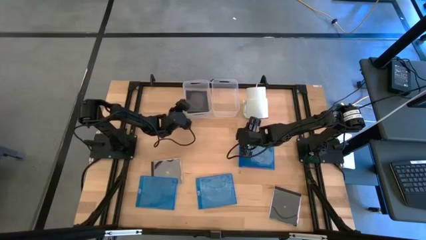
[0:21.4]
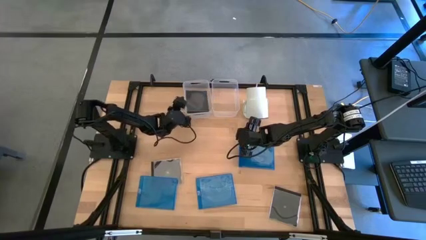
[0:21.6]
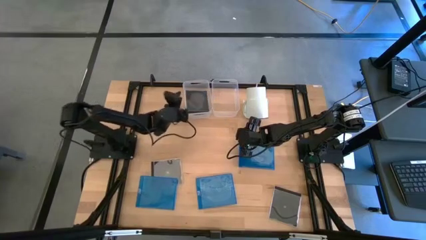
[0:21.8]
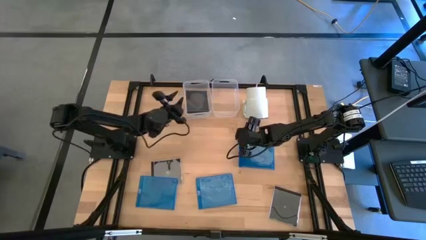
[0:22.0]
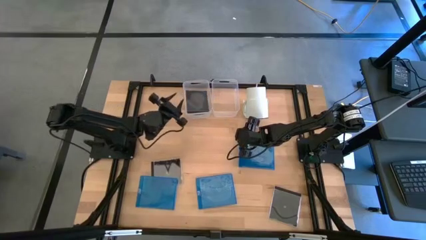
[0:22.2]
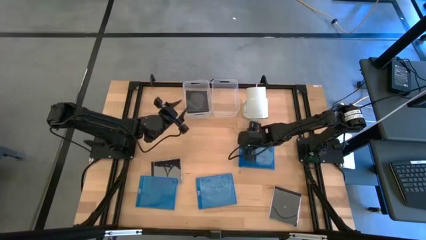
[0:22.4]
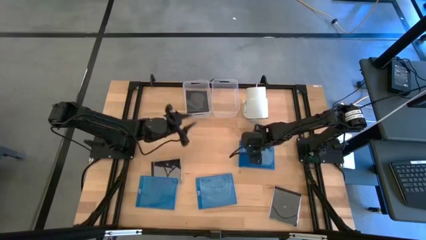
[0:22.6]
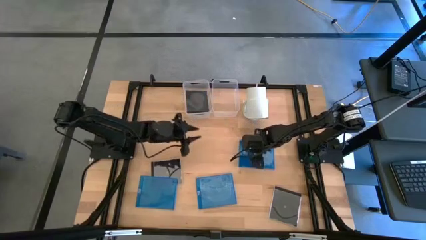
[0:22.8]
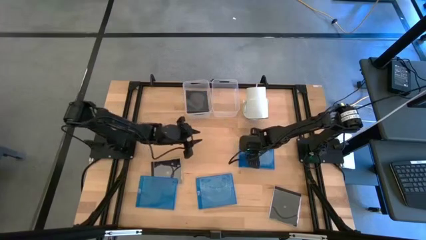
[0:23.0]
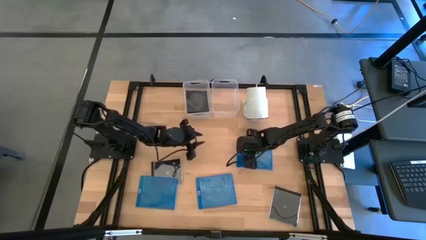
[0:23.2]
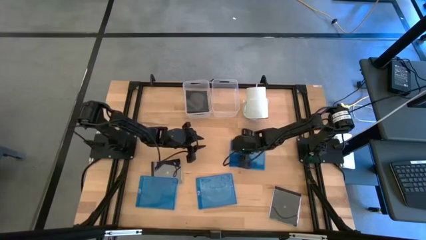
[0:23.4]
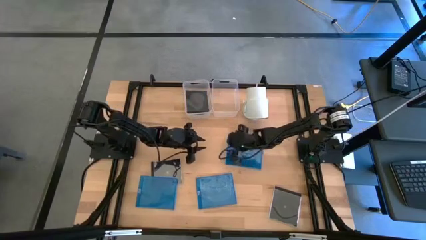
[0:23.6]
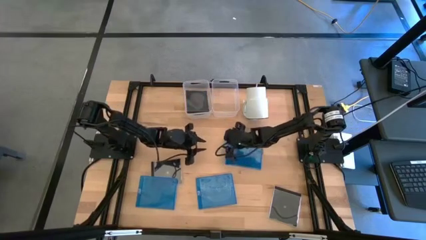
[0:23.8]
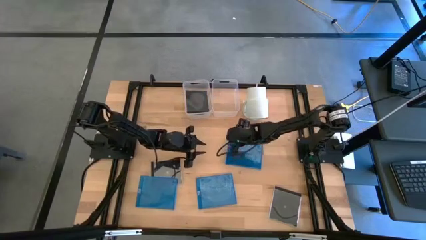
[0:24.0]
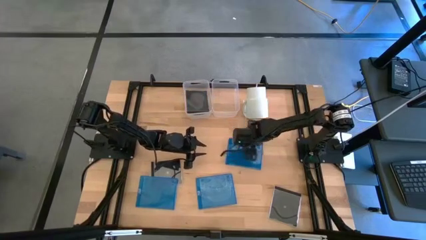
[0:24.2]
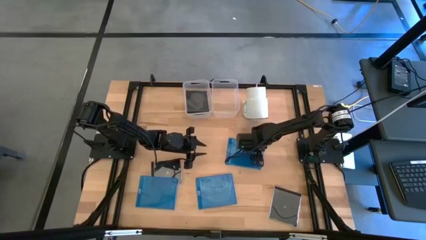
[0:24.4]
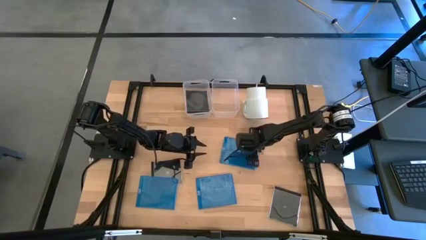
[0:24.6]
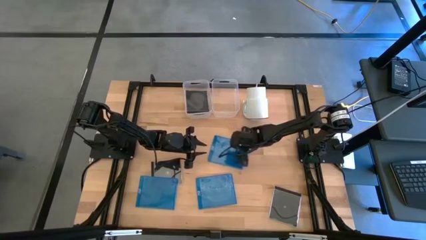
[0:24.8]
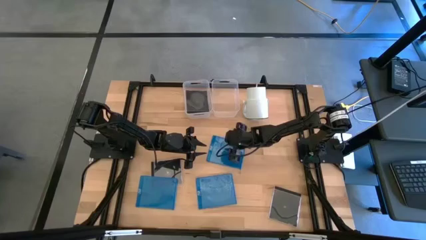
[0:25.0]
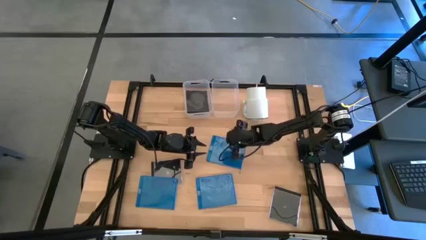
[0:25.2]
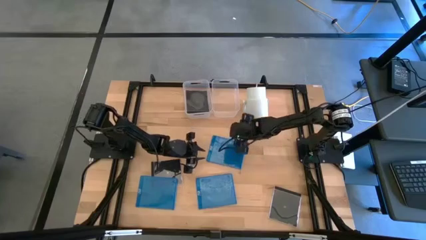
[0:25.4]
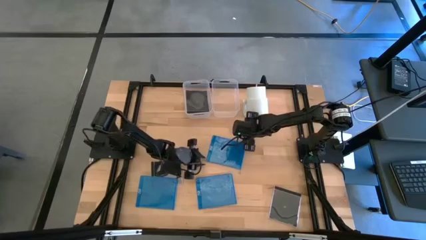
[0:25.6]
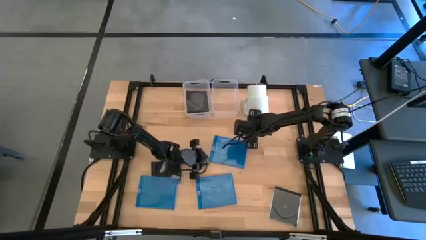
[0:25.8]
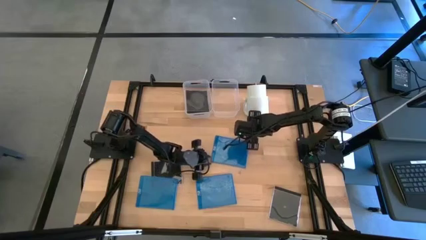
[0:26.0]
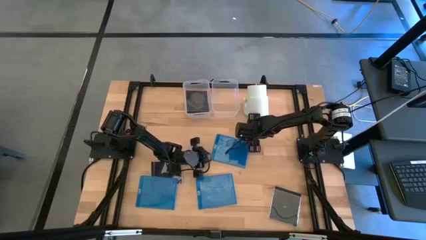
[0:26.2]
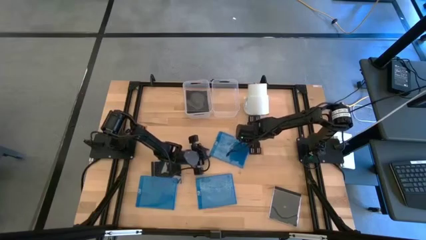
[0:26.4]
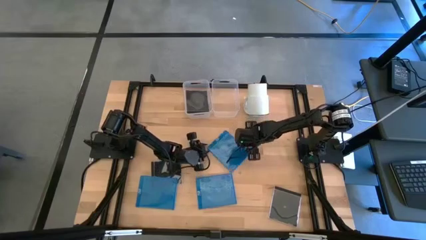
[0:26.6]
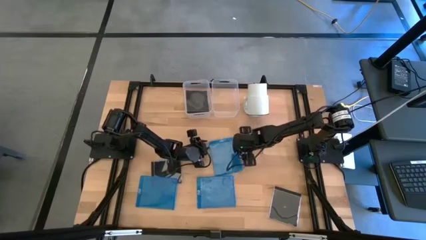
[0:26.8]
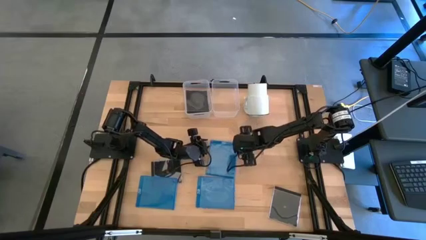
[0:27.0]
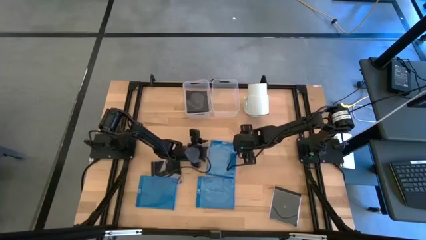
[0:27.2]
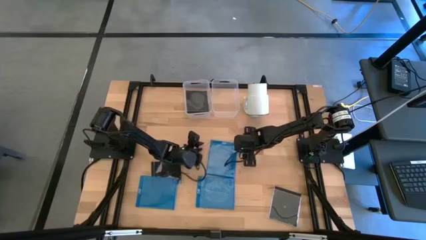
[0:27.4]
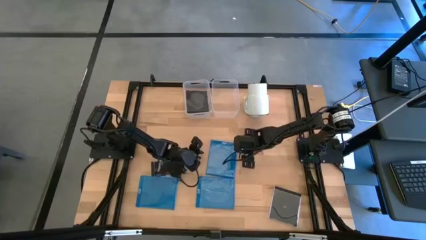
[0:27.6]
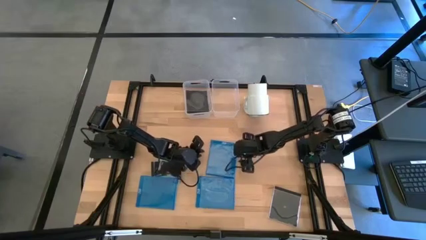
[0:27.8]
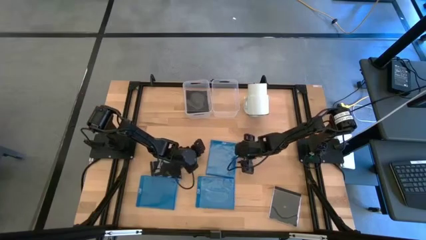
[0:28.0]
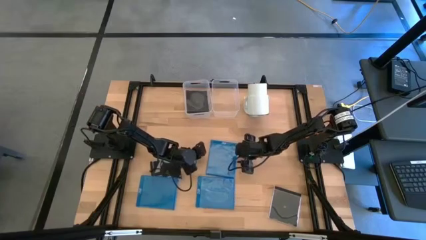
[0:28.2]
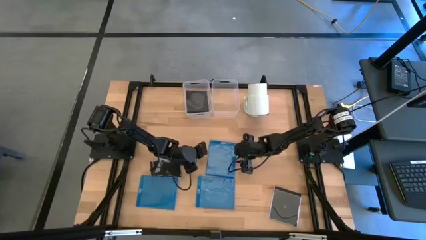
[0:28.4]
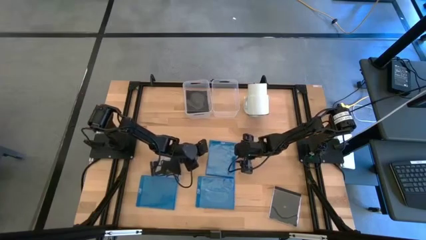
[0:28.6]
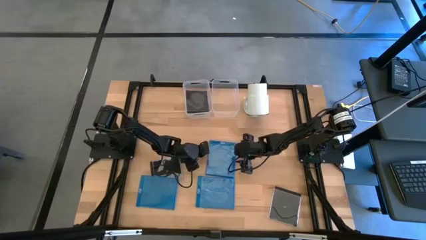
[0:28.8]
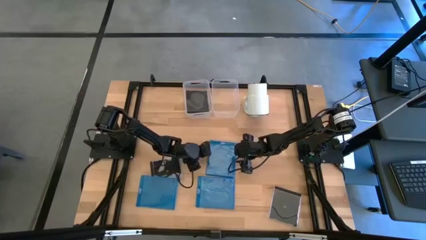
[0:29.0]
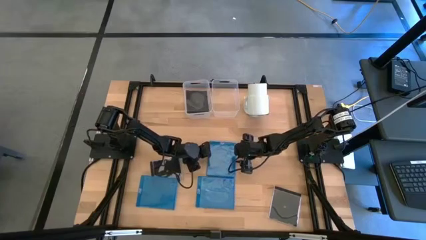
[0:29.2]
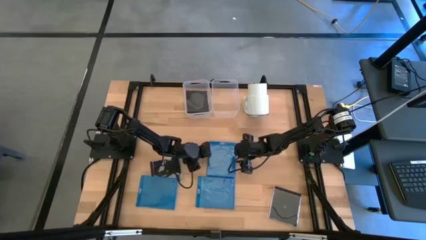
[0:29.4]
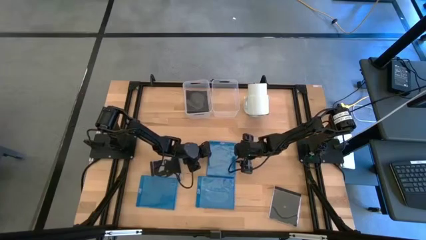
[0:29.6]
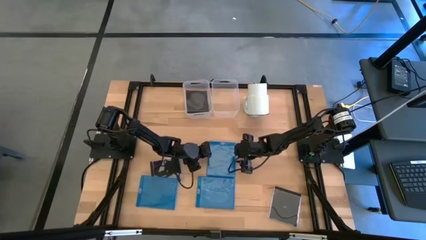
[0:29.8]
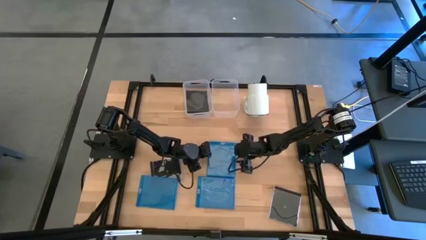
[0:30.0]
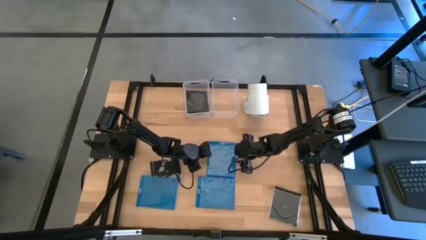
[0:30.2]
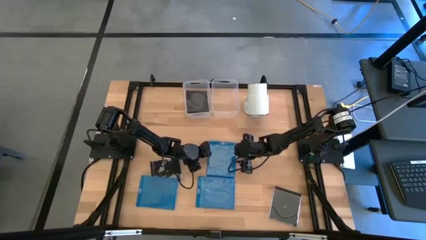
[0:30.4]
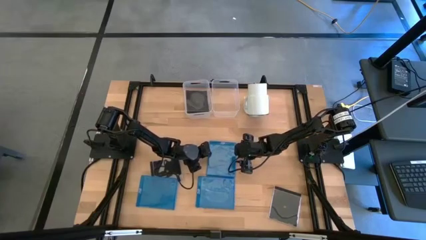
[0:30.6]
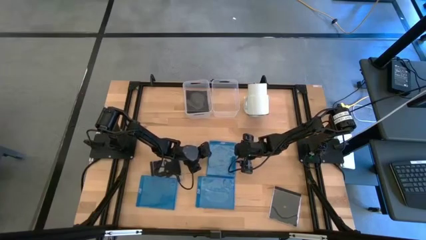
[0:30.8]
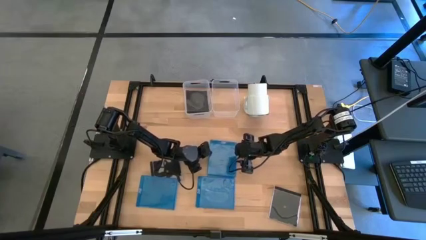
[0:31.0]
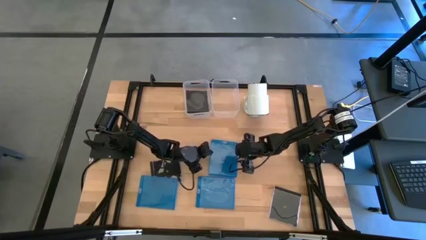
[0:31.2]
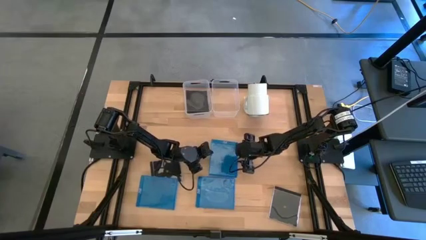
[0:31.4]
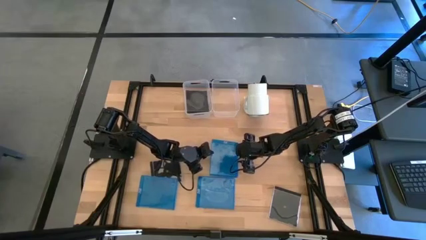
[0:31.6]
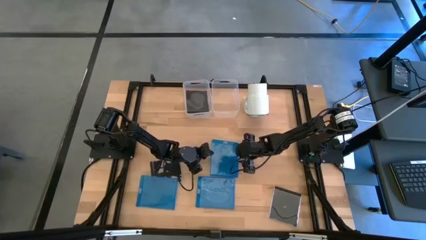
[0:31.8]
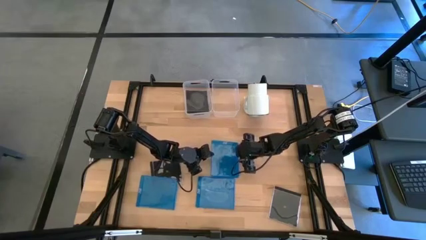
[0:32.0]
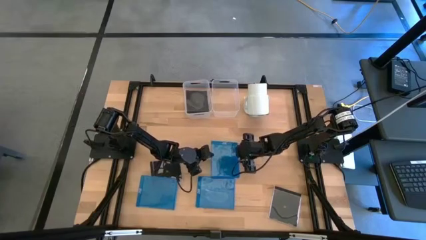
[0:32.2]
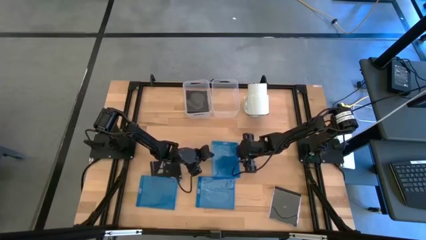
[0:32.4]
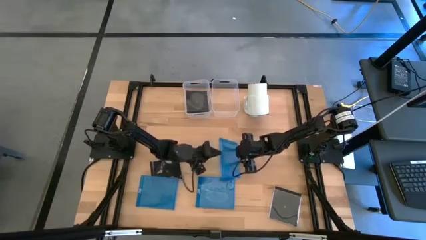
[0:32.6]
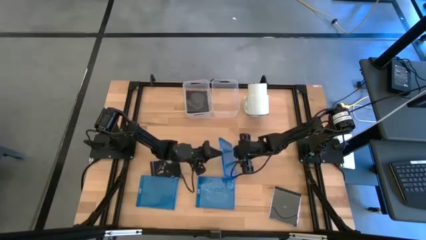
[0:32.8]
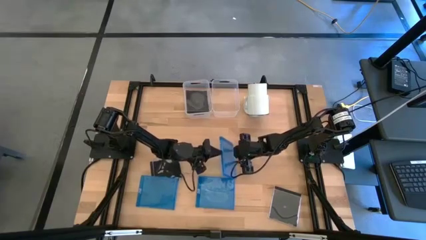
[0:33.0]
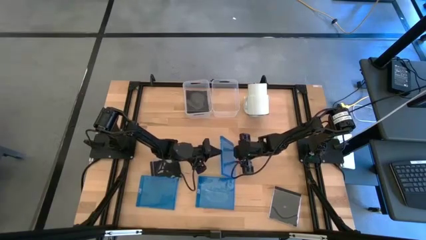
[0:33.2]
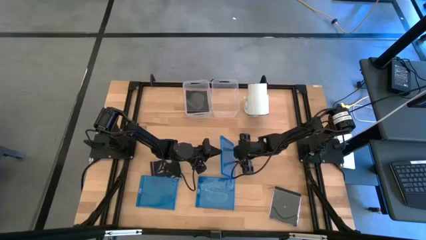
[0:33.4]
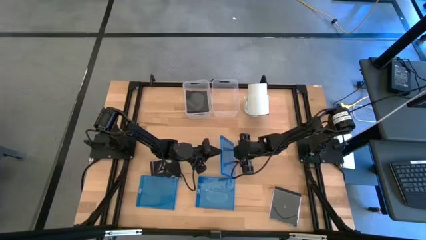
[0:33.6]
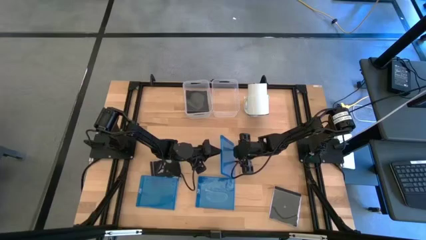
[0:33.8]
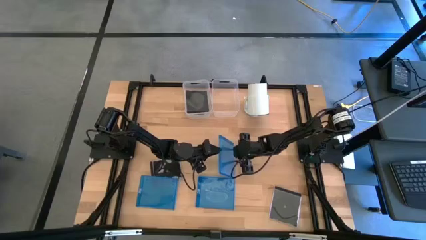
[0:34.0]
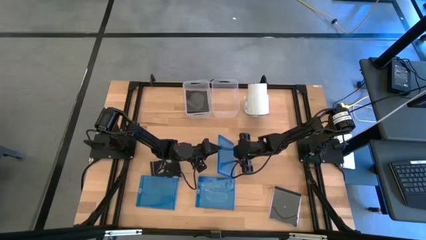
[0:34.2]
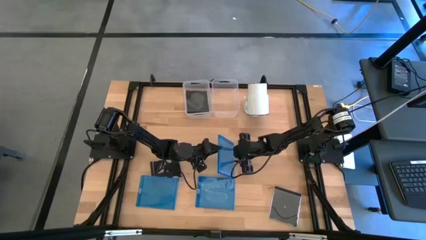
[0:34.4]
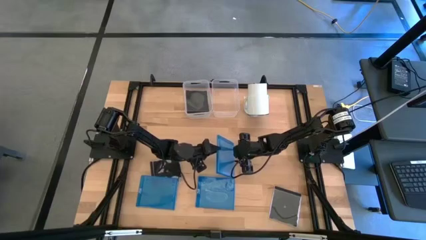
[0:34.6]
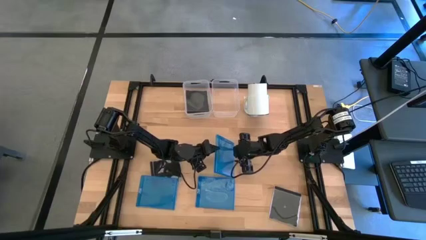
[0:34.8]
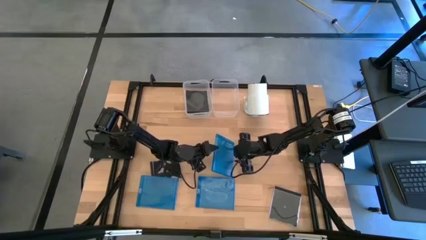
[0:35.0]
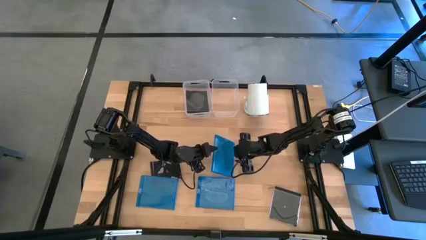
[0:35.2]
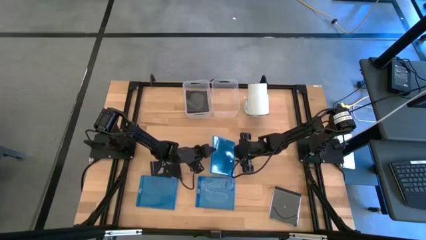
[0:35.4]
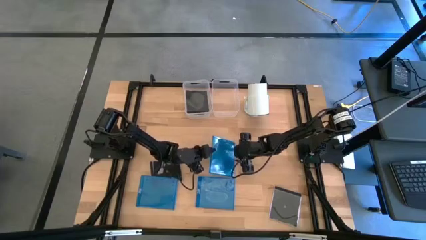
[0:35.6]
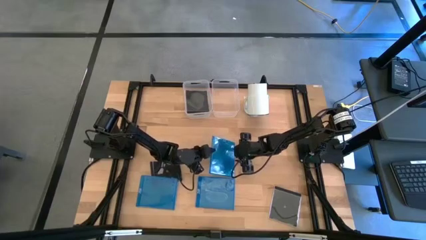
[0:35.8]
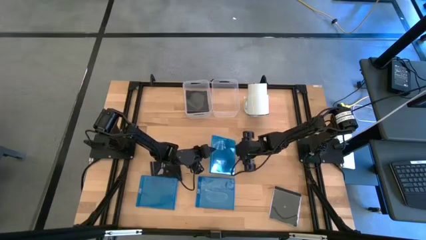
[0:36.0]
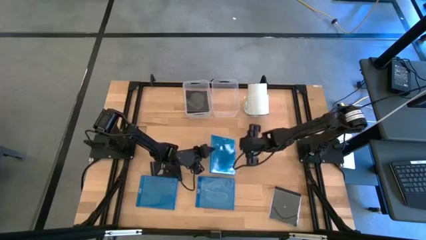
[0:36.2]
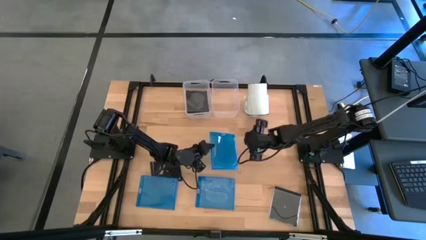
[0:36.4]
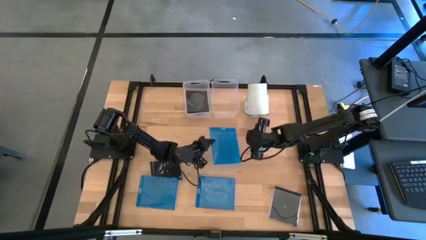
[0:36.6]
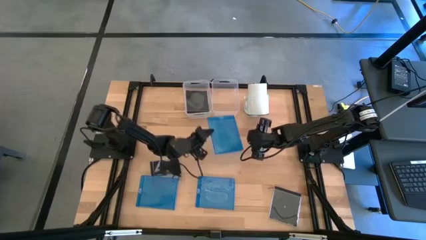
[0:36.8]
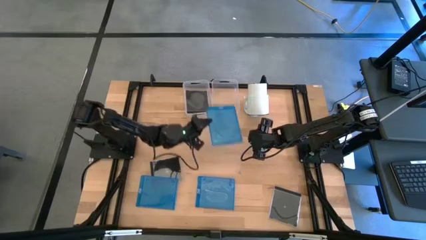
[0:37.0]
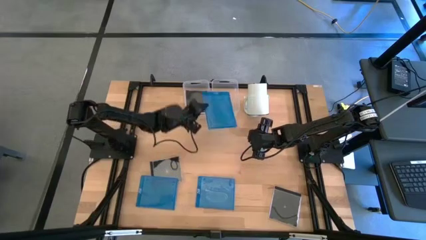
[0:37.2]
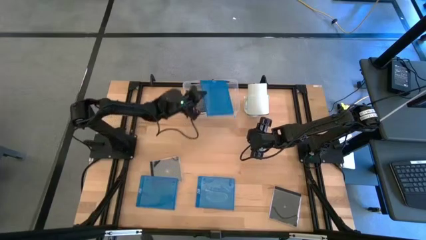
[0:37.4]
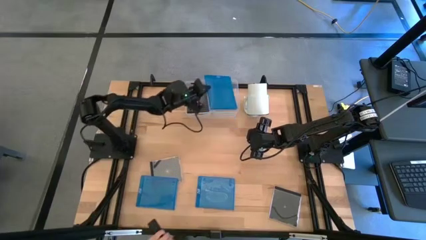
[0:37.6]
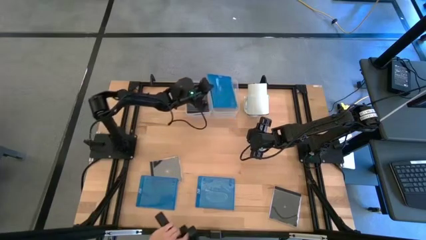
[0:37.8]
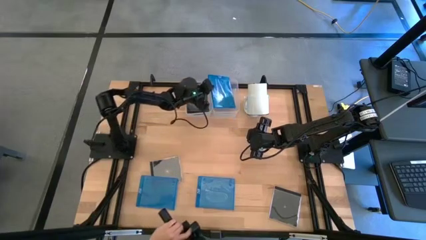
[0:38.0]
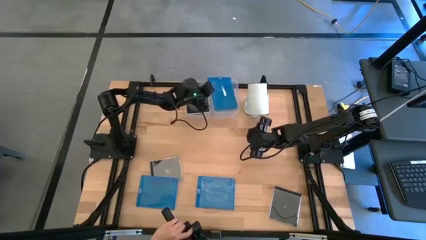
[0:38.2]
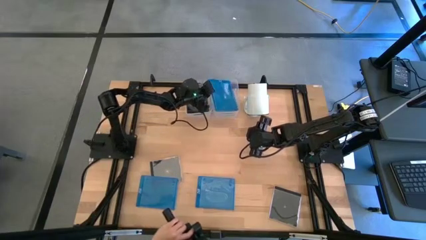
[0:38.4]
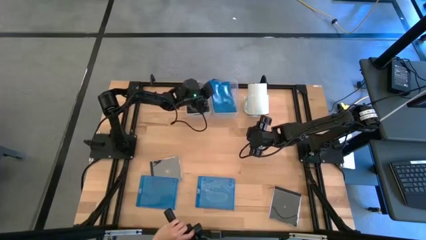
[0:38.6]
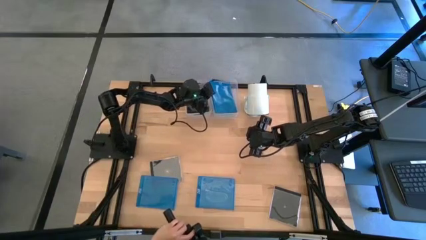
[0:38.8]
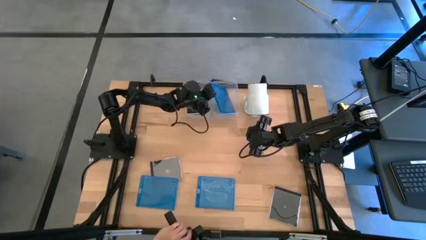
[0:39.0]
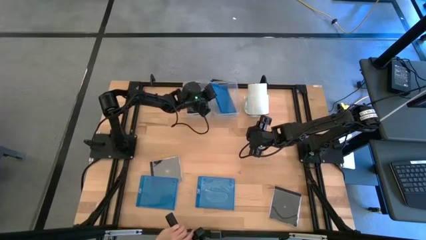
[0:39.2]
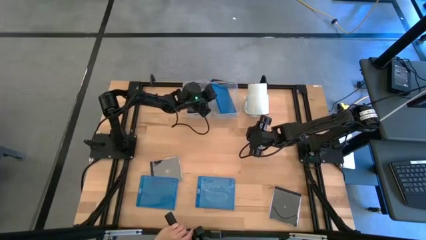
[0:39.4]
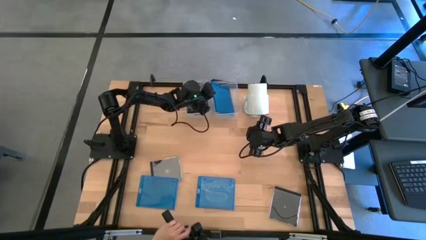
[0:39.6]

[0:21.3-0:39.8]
Task: Pick & place jewel cases by type
Put the top blue CD Case into the right transparent bin
